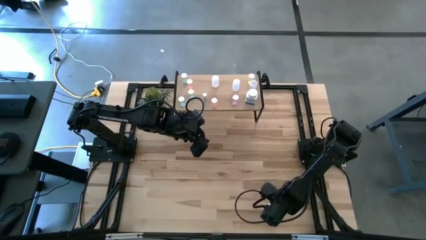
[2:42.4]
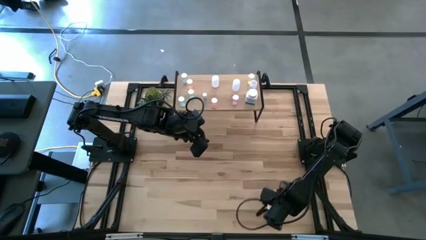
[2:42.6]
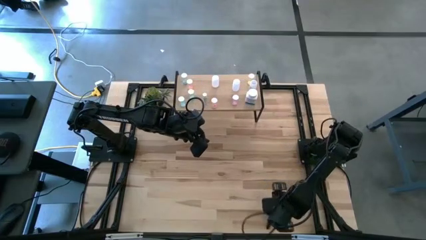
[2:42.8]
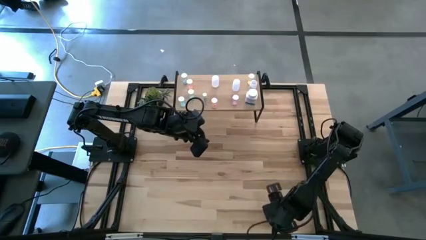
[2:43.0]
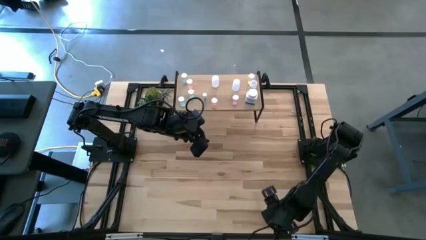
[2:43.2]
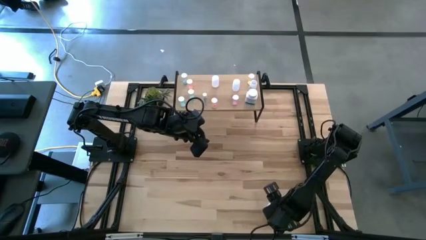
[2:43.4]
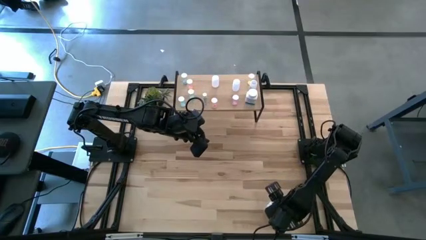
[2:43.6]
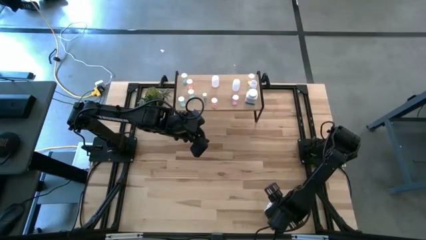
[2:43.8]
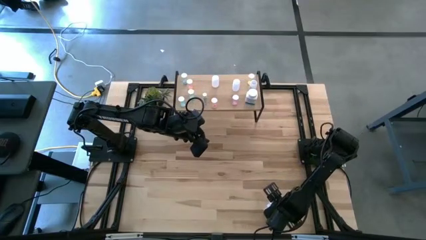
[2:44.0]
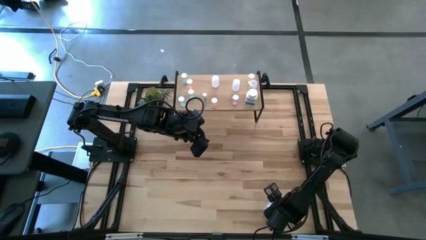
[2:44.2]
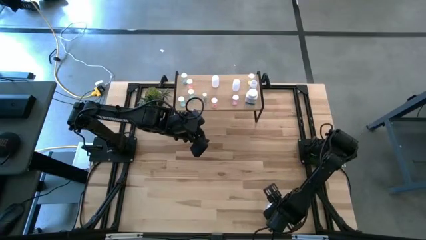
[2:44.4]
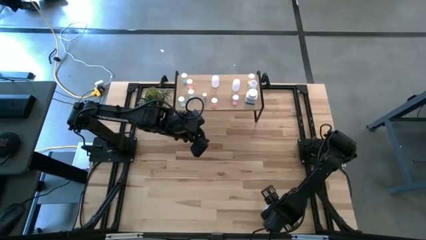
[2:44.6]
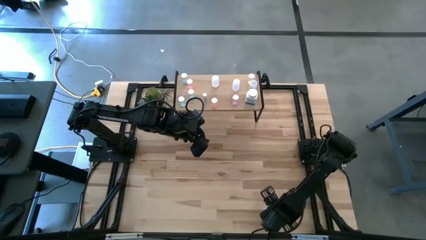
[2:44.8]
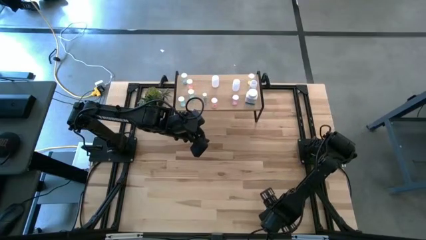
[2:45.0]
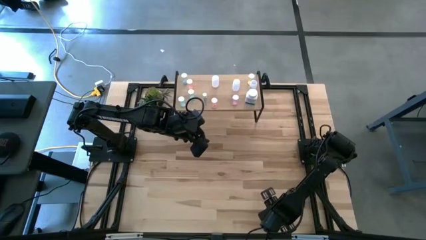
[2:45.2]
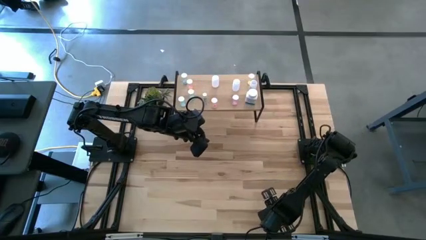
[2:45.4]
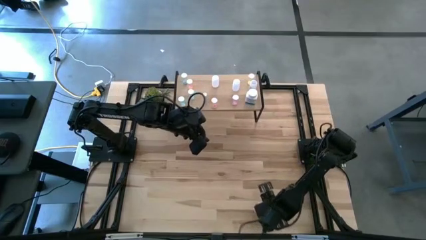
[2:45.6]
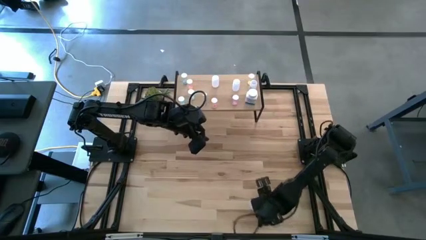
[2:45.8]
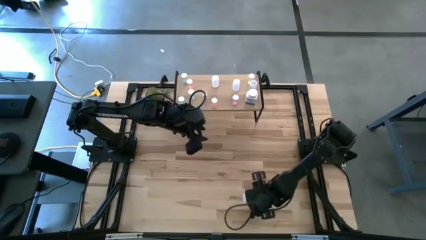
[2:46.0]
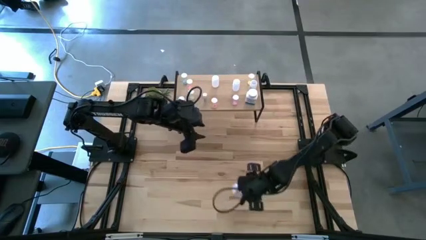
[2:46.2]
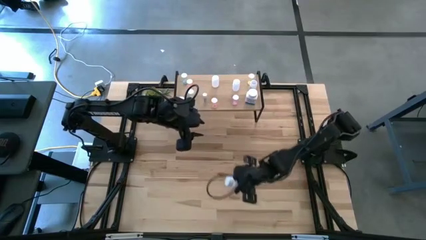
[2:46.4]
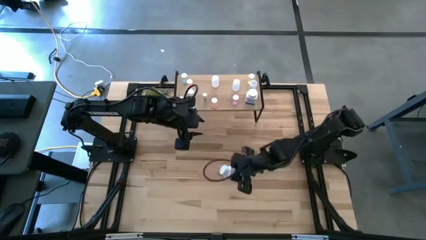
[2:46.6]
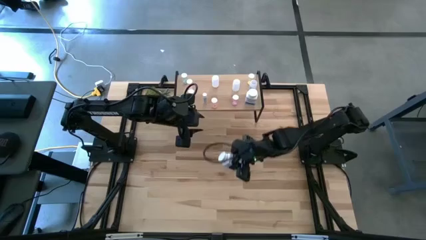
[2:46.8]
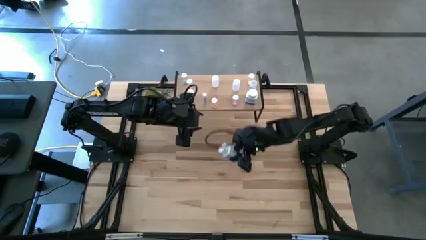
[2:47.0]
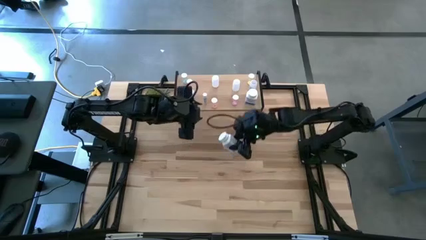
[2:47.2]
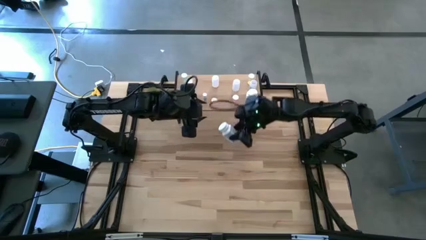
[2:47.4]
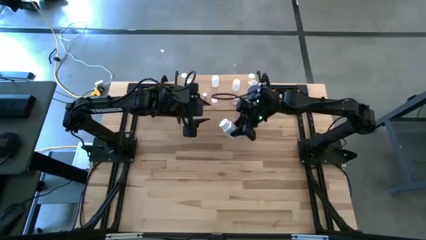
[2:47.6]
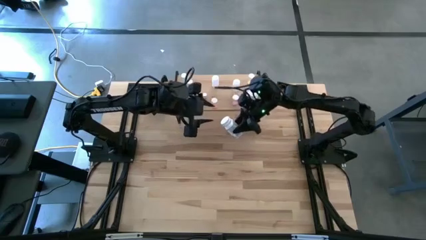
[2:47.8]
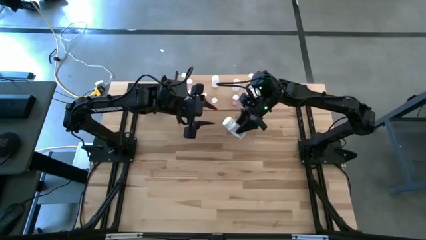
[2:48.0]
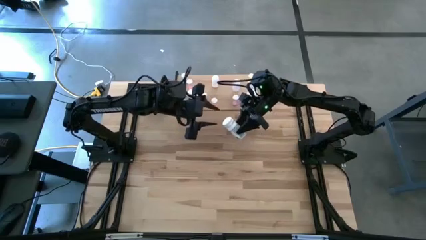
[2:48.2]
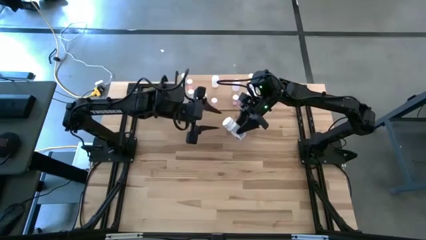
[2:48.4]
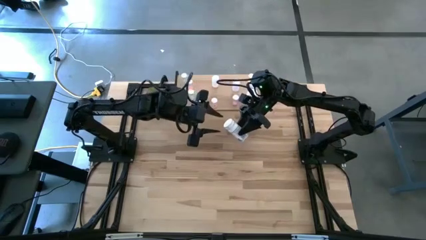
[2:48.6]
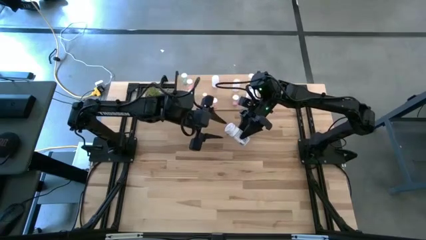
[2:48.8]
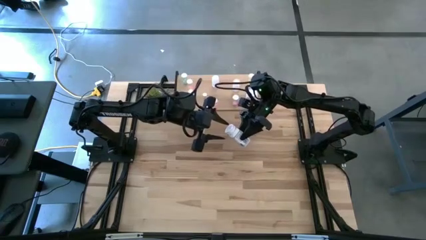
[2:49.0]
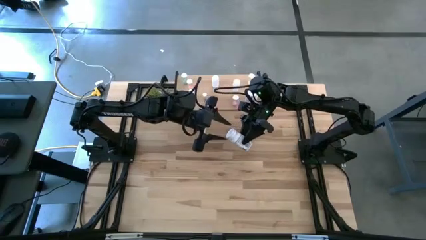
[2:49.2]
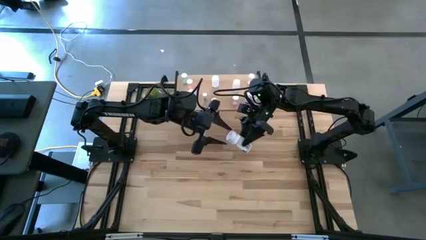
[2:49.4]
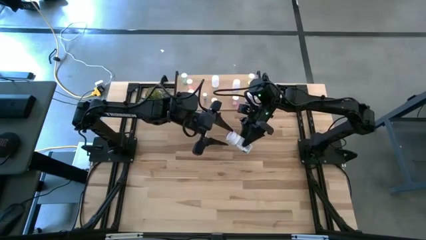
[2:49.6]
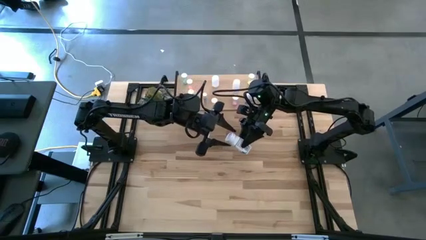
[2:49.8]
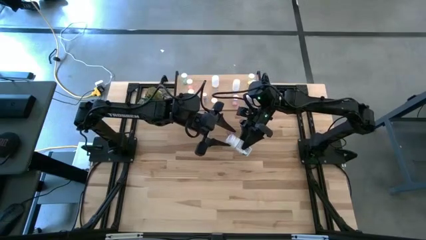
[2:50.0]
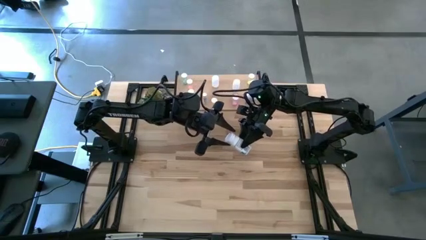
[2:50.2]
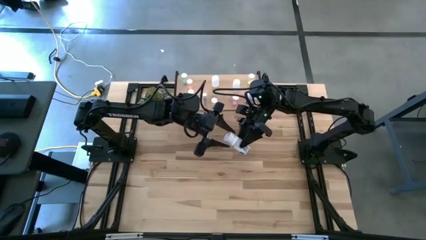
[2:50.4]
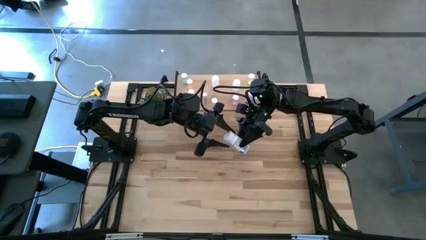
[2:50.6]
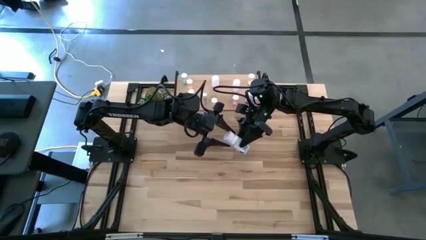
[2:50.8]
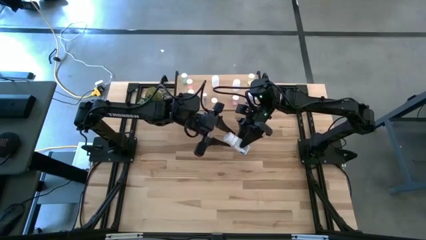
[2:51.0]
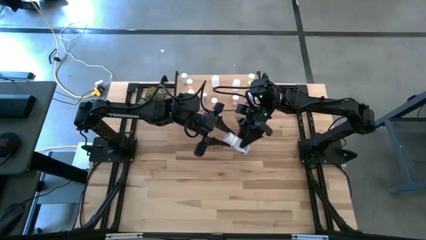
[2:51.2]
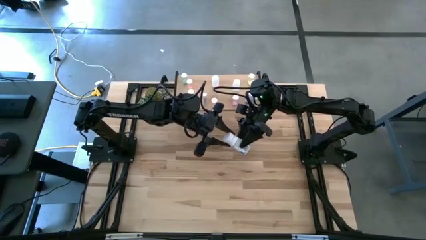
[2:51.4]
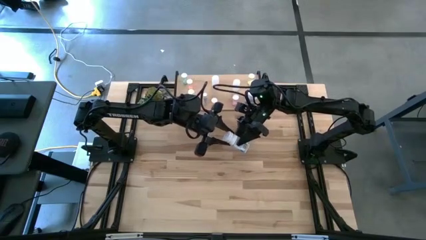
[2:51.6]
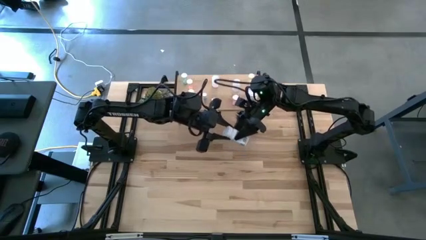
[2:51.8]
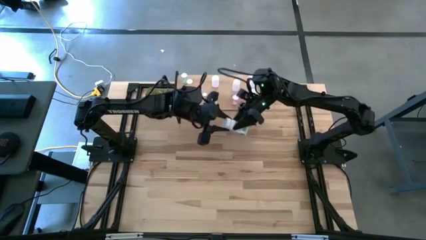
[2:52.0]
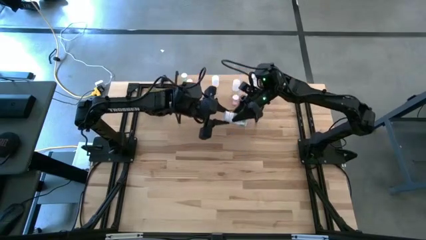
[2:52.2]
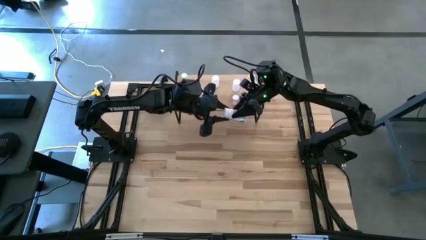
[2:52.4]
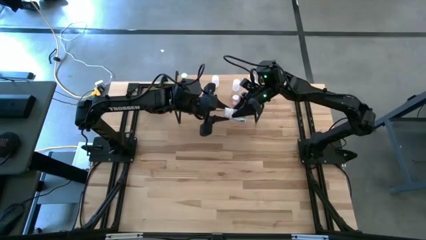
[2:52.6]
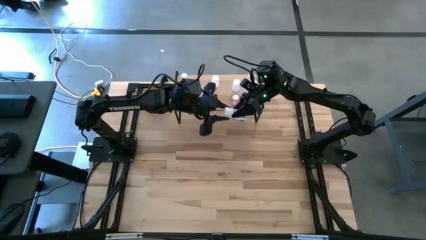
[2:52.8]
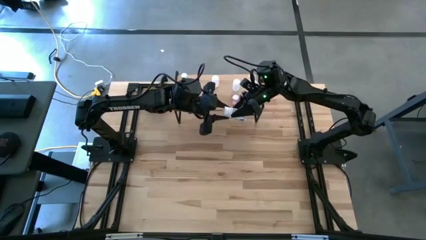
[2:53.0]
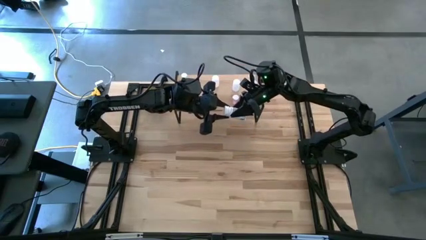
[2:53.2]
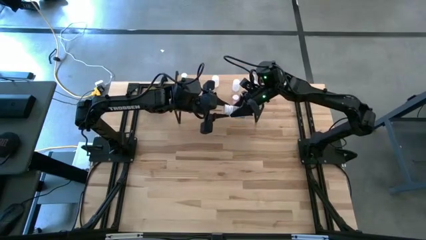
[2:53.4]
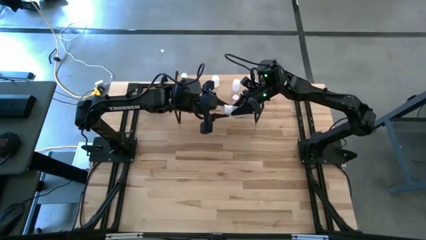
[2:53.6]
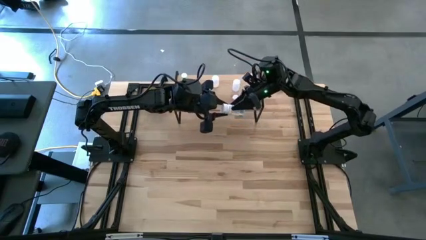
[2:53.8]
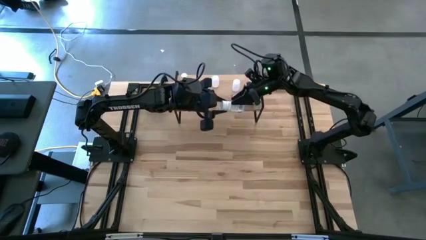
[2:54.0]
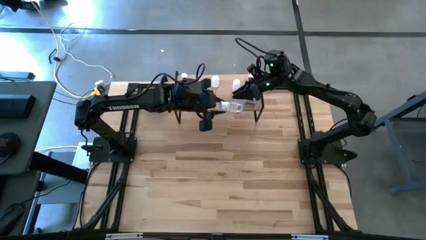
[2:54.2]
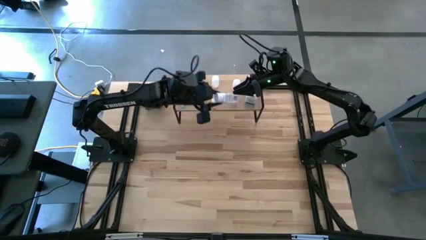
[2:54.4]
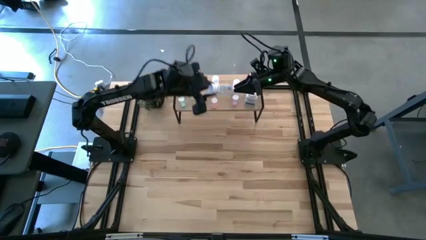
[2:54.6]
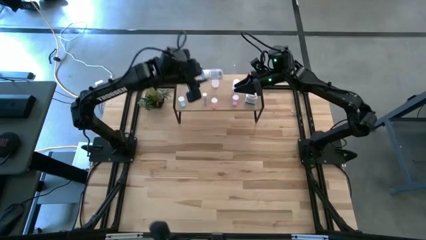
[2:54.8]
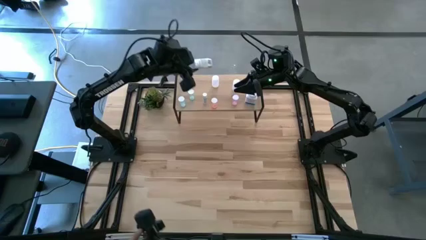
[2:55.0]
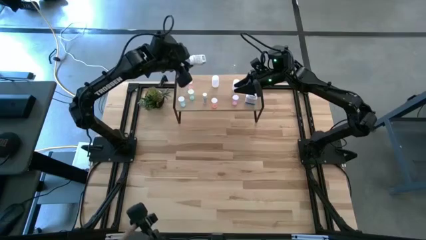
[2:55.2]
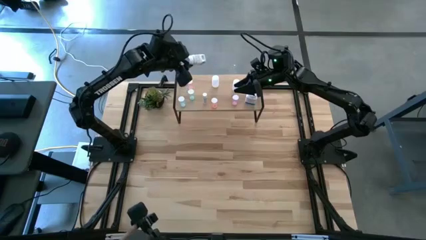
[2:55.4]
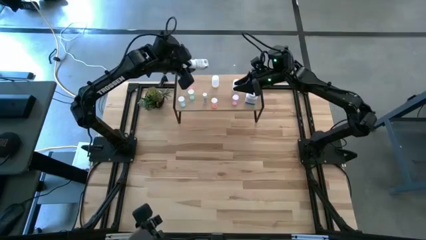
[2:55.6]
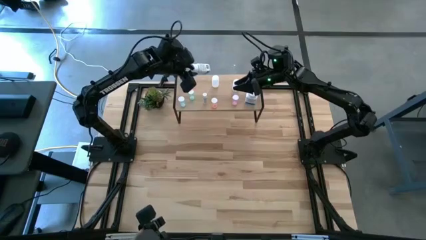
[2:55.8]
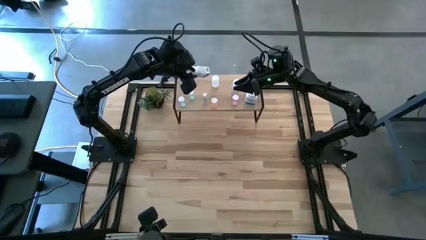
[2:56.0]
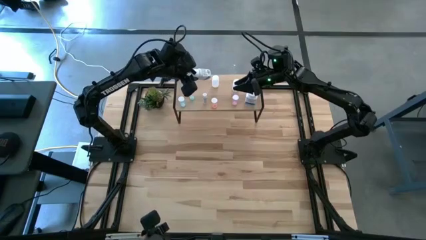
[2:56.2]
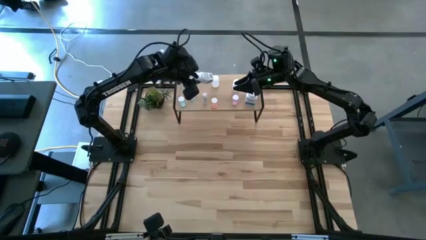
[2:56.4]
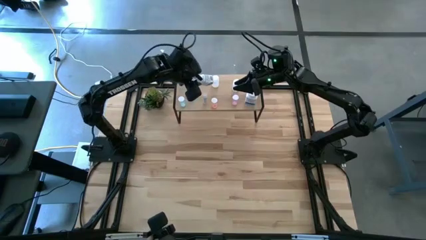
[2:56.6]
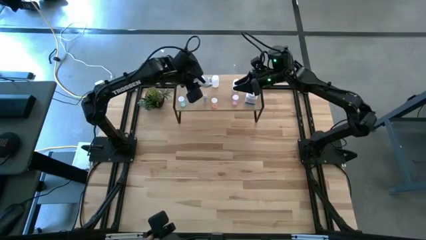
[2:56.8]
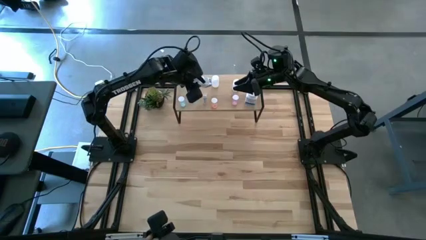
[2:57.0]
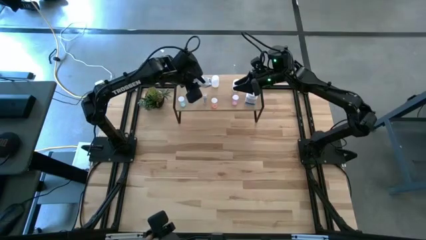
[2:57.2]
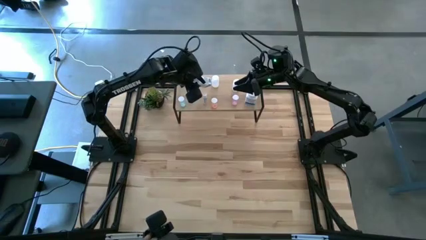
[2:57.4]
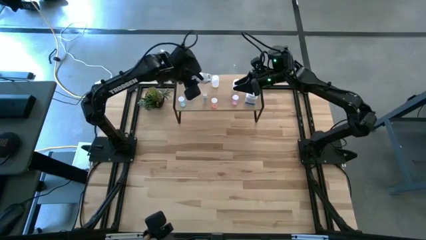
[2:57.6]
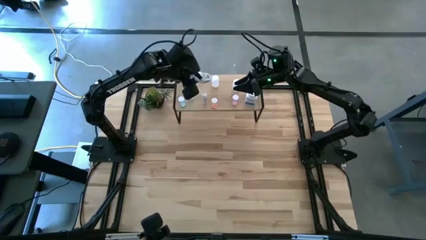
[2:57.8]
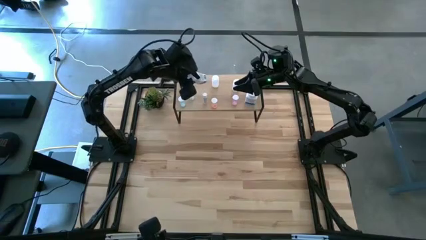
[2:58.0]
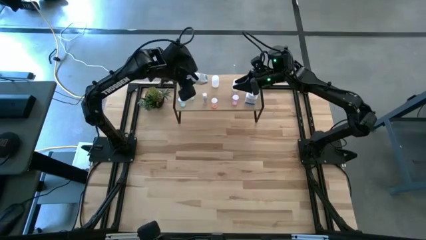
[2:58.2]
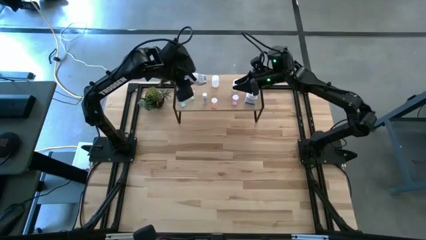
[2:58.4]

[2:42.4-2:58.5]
Task: Pick and place medicine bottles onto shelf by color
Put the white blue pill bottle on the shelf

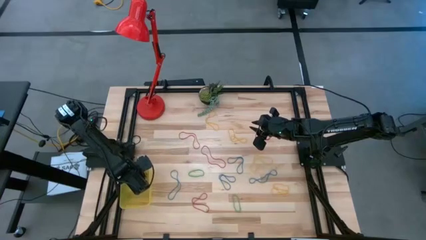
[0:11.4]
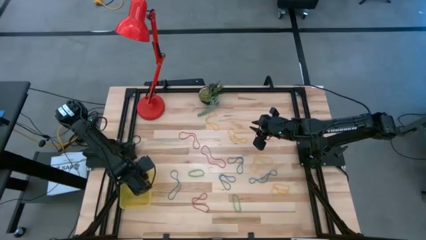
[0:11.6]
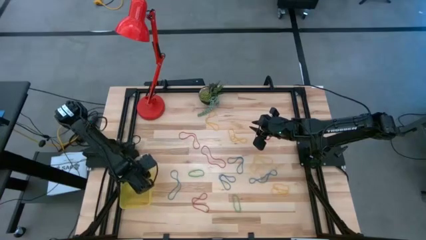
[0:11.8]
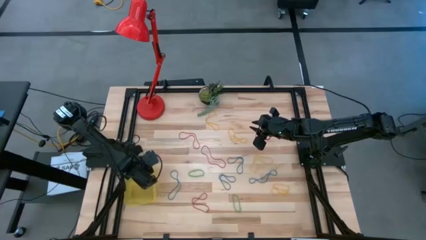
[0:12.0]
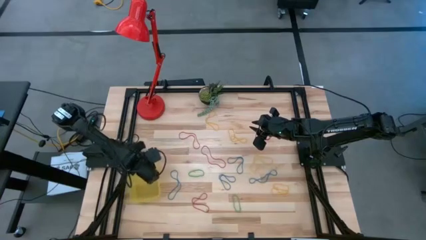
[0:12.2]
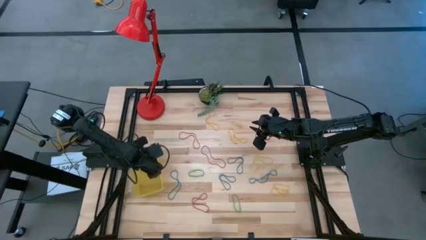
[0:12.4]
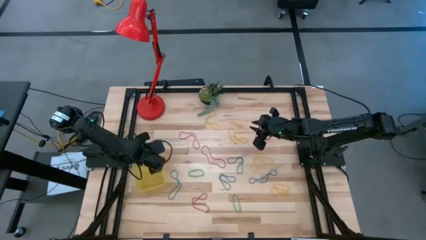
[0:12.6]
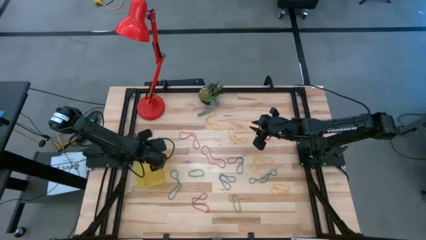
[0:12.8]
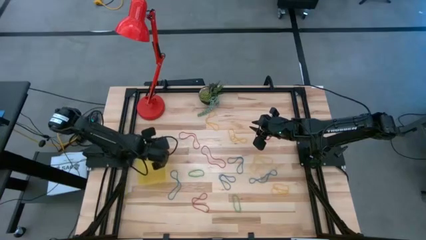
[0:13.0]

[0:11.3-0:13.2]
Task: Pick and place items into bin
Adjust the yellow bin
